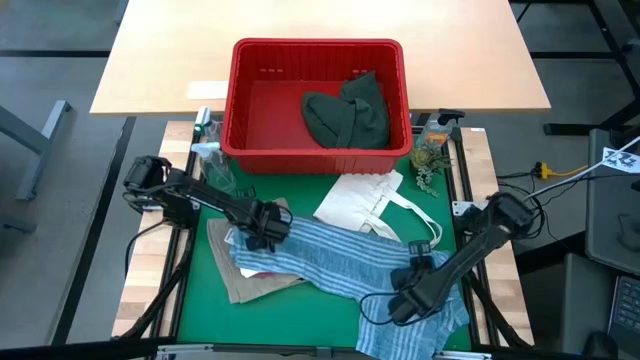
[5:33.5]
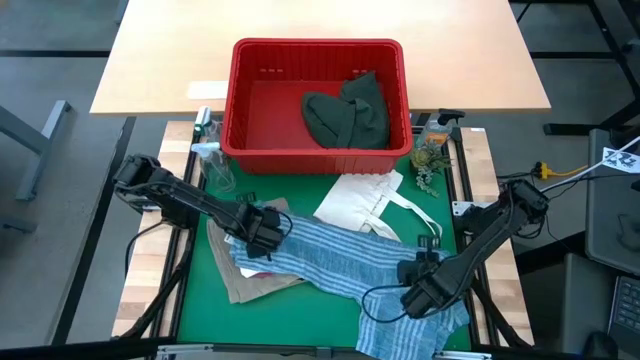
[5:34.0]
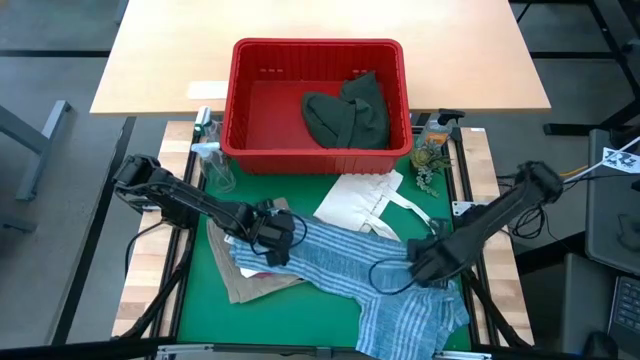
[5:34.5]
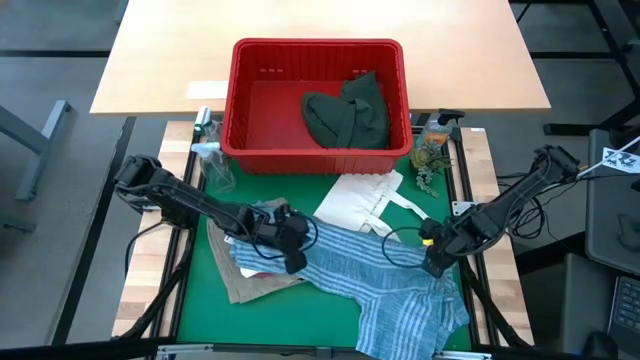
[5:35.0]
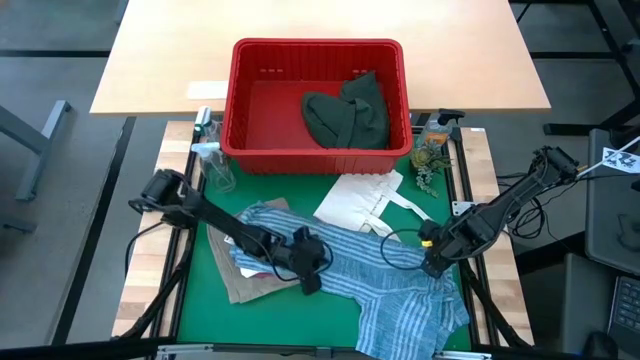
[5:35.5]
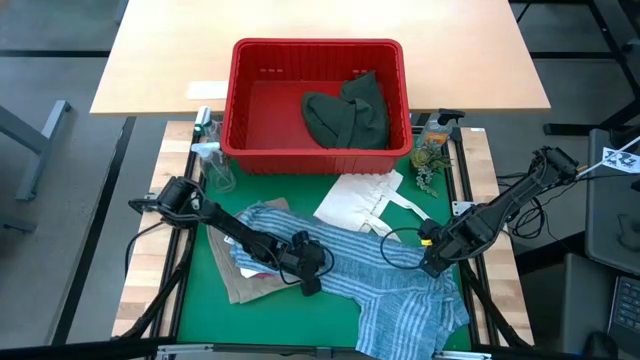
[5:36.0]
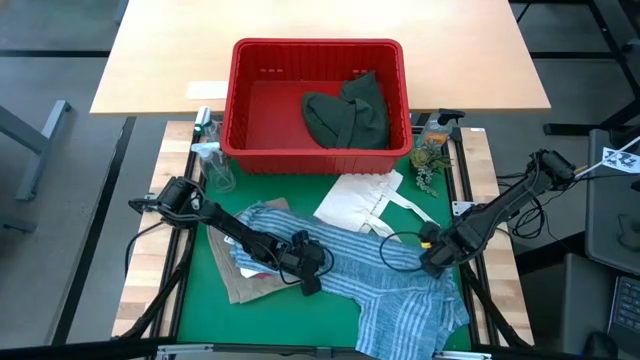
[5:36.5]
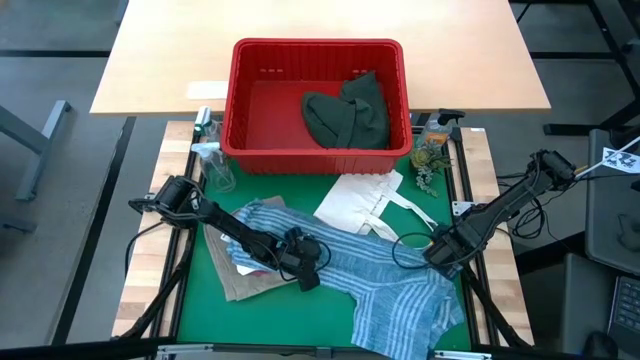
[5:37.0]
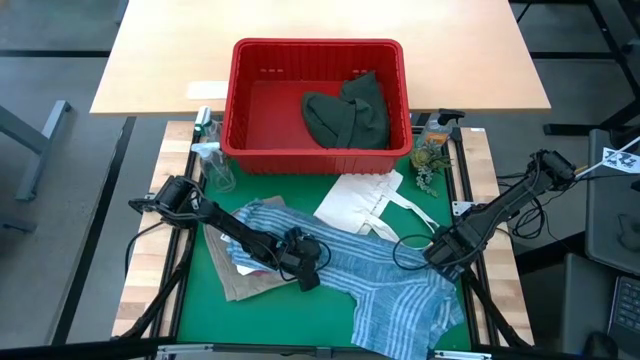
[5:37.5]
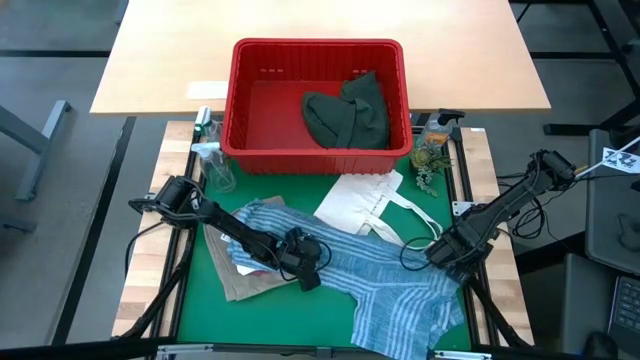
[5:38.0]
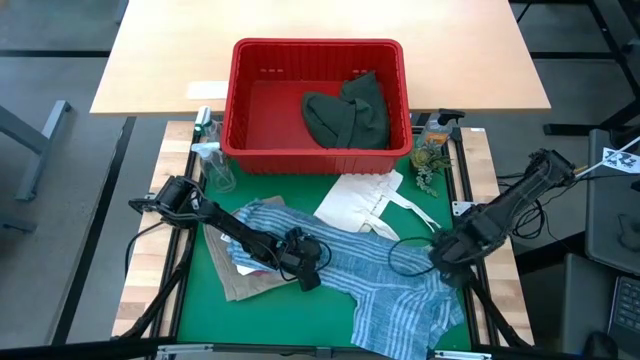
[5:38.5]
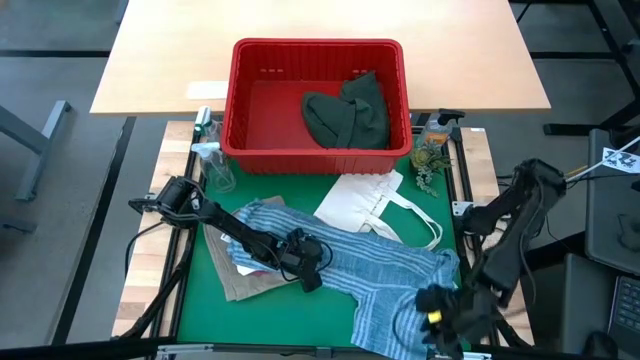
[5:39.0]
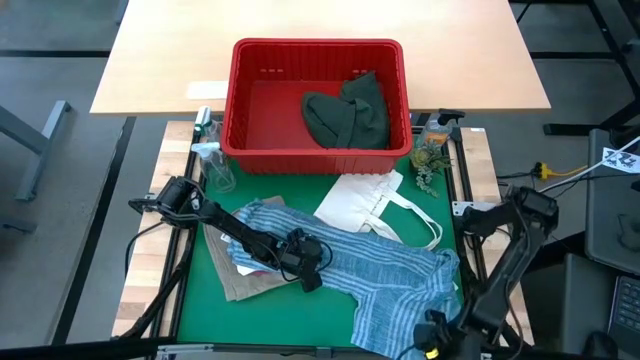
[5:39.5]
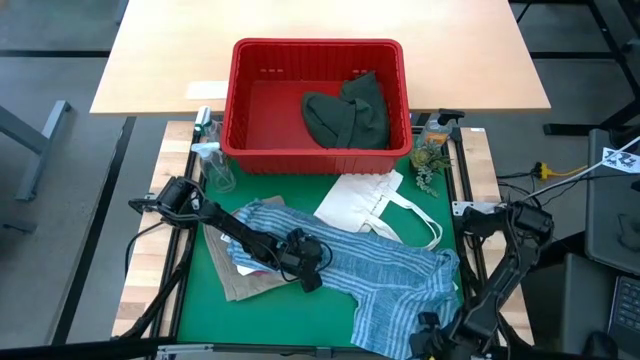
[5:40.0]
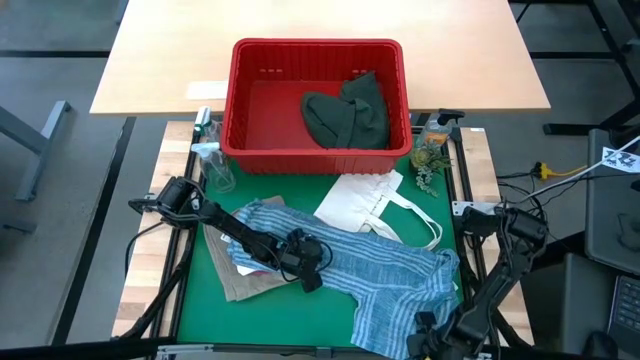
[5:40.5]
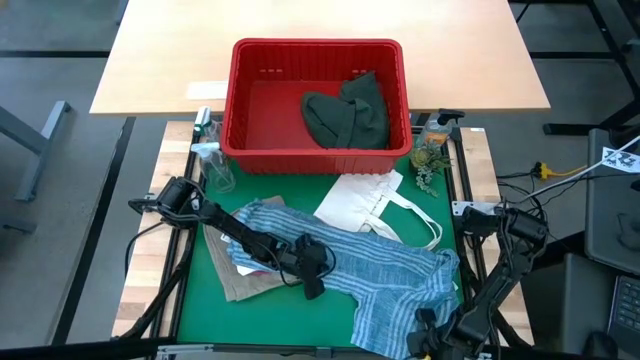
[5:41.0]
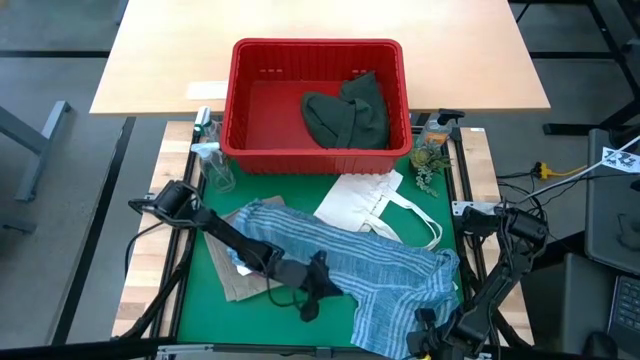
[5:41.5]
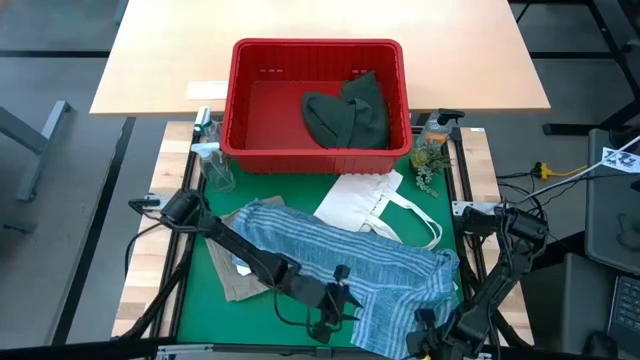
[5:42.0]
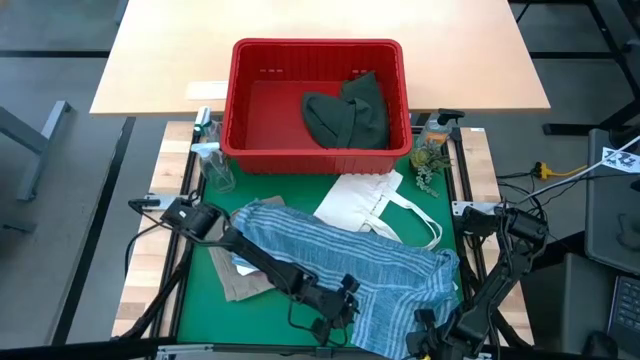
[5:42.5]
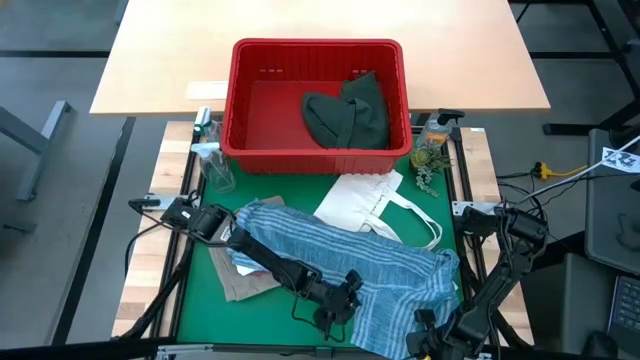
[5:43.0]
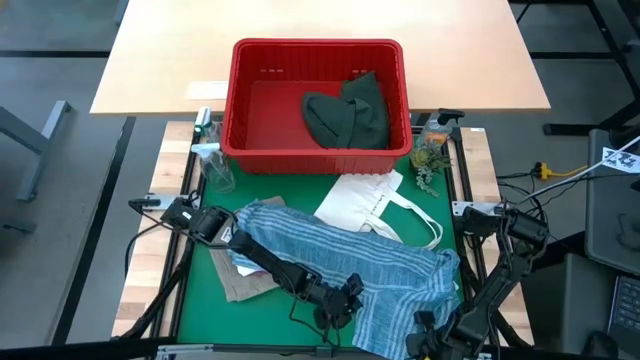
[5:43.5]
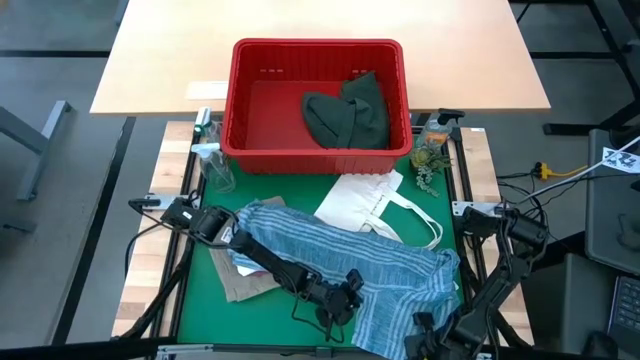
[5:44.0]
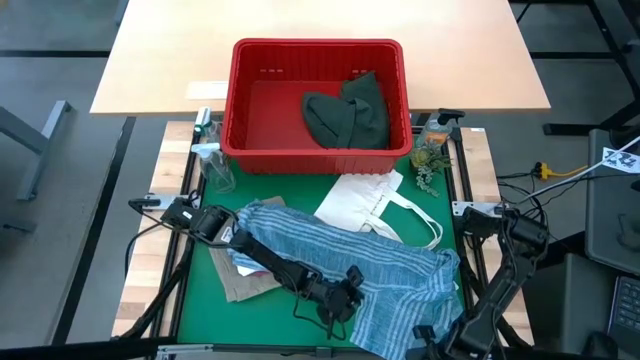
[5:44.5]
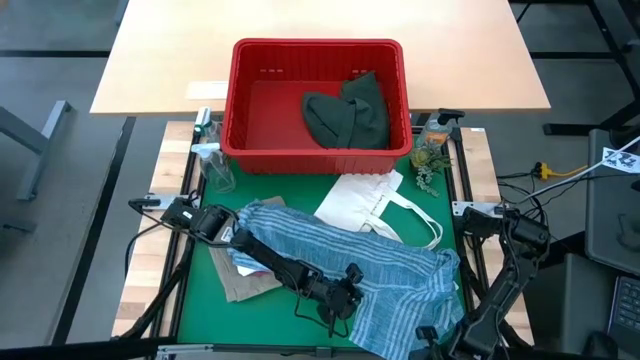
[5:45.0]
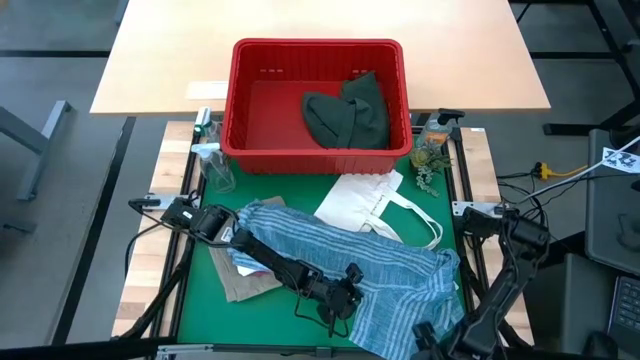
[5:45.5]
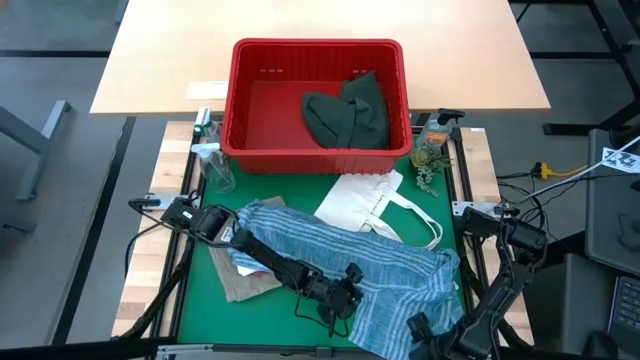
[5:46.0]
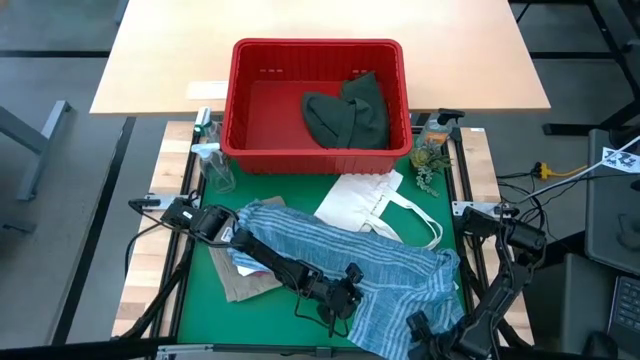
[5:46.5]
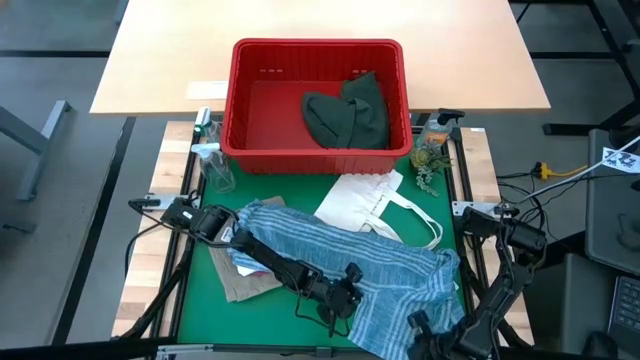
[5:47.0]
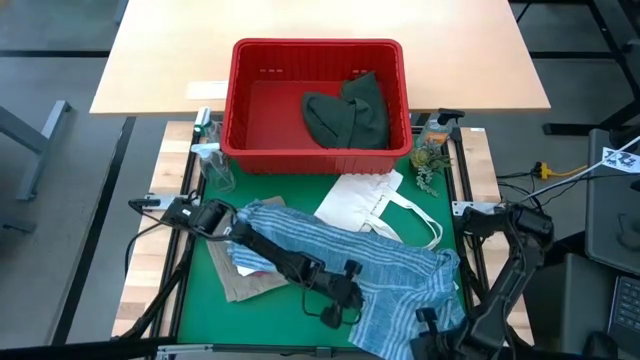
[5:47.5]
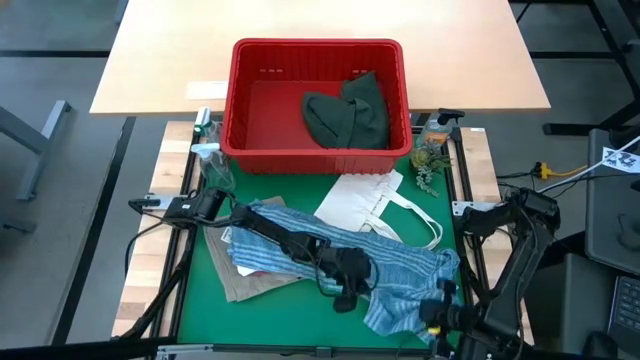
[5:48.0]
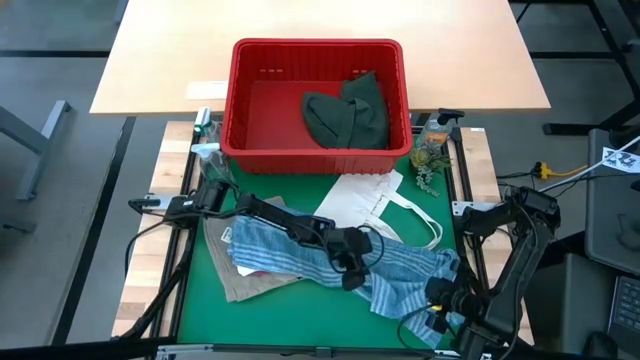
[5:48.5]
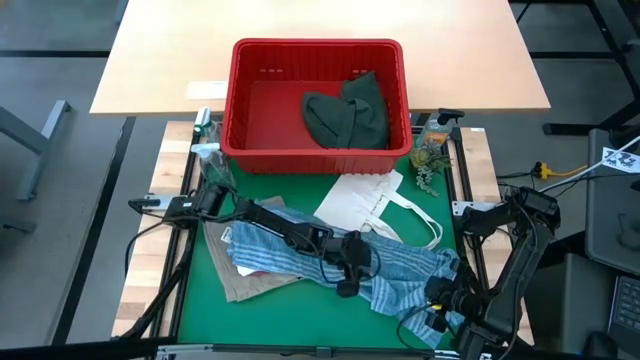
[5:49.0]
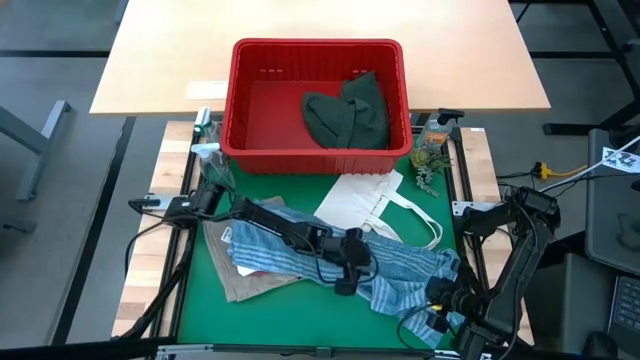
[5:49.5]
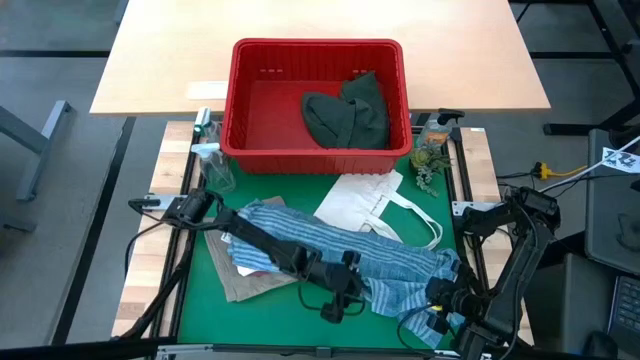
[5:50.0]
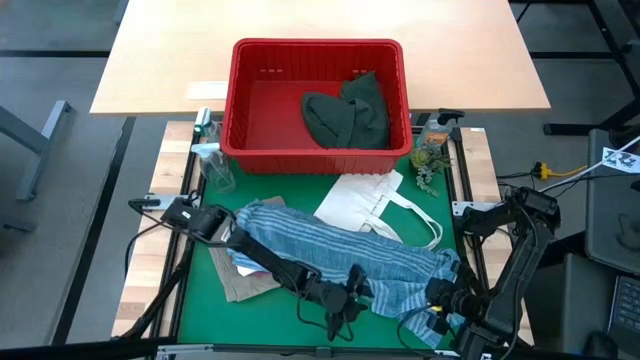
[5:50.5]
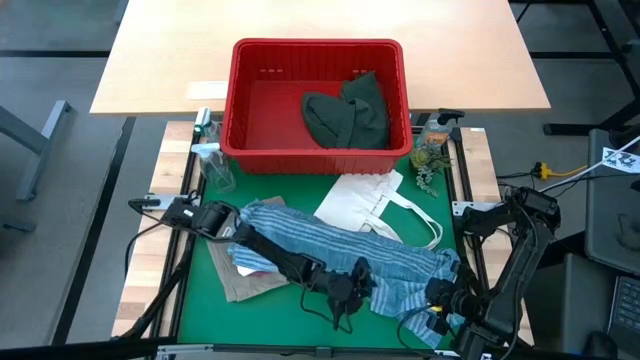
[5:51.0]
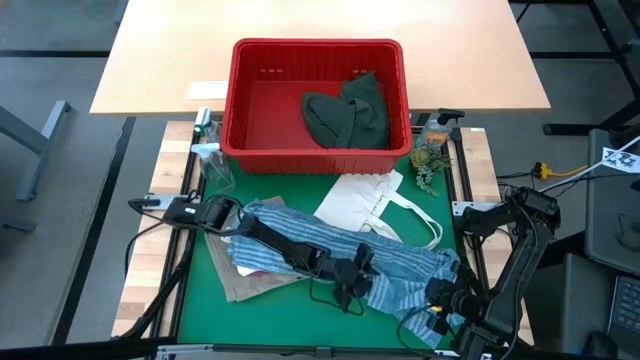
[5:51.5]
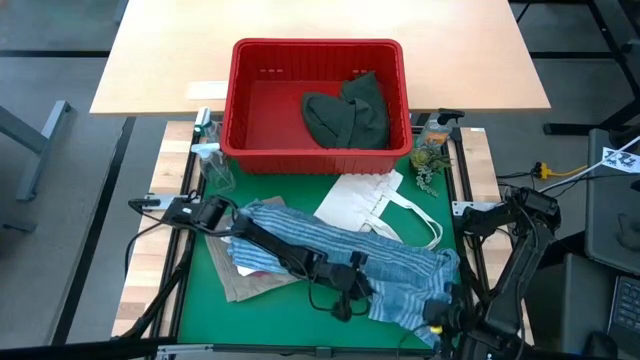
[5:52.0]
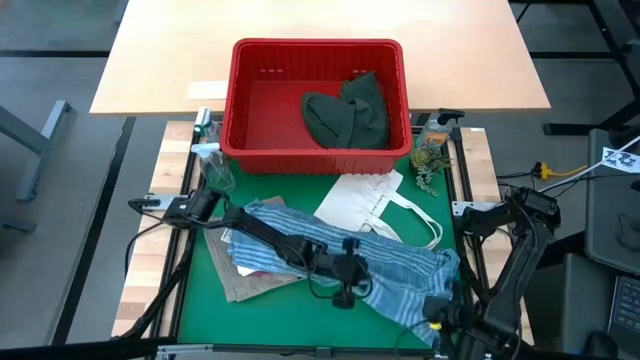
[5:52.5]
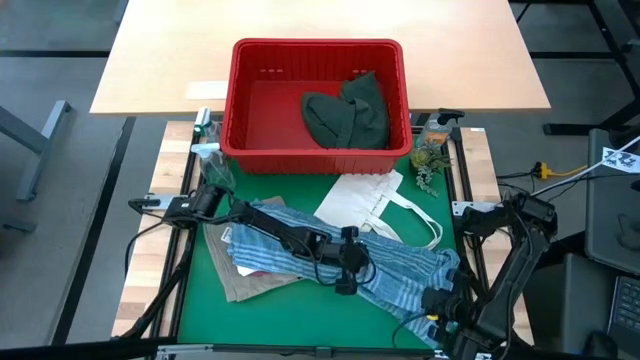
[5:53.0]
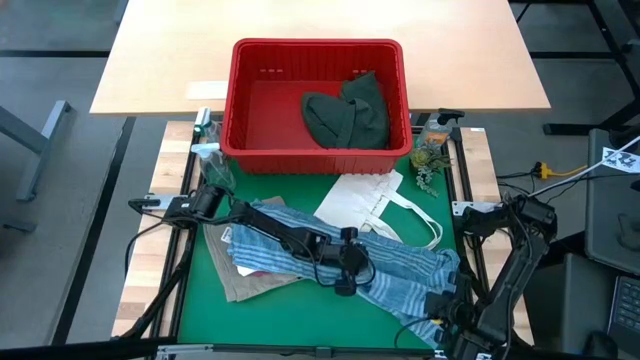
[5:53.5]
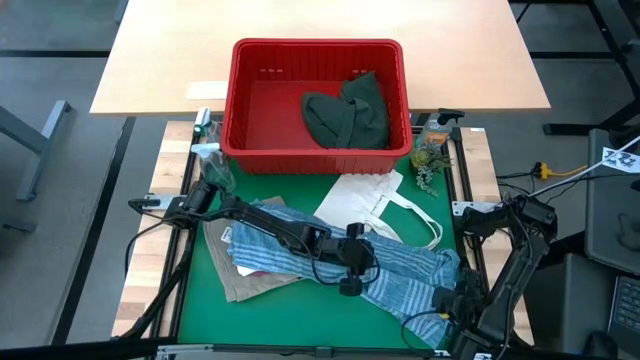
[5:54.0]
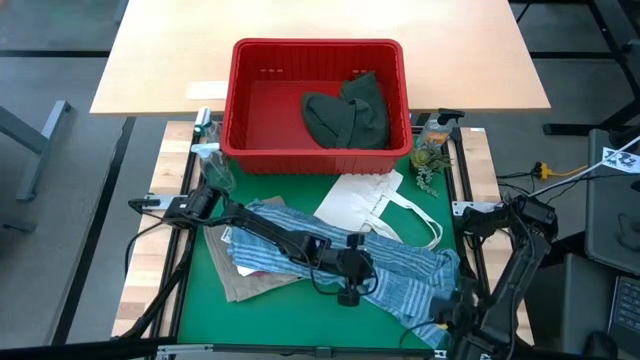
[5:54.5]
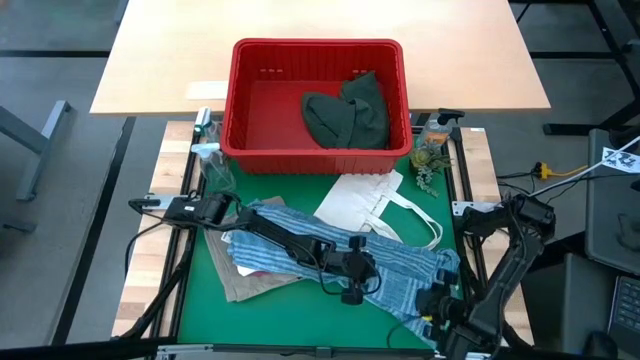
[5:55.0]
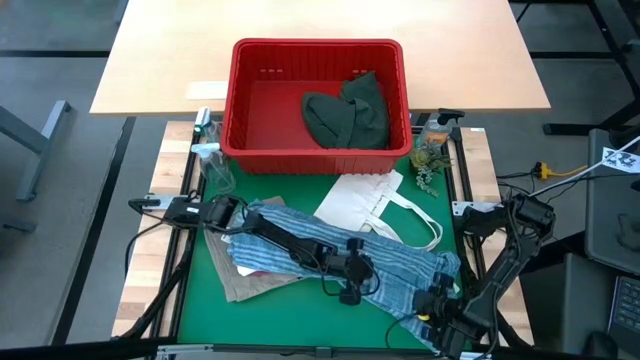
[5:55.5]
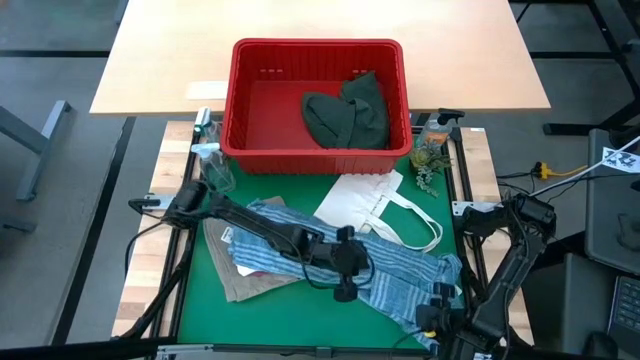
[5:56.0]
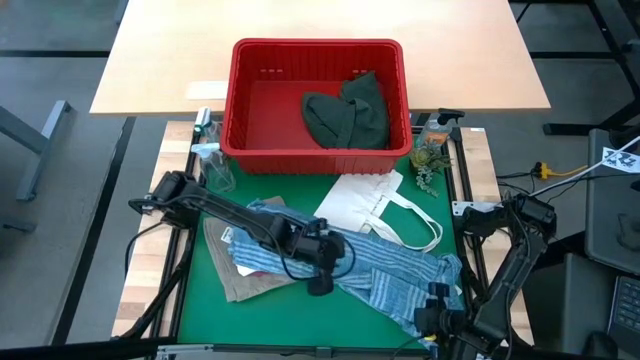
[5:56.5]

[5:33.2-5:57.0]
Task: Fold Laundry from Bin
Fold the blue polo shirt
